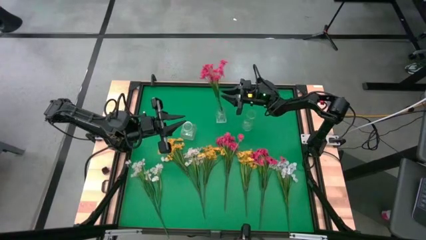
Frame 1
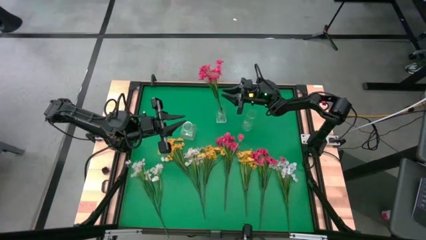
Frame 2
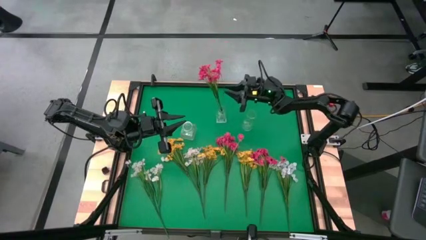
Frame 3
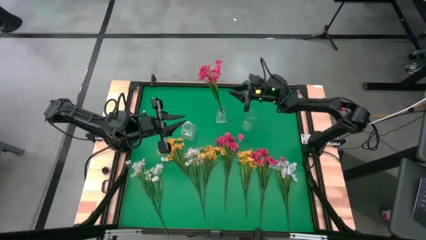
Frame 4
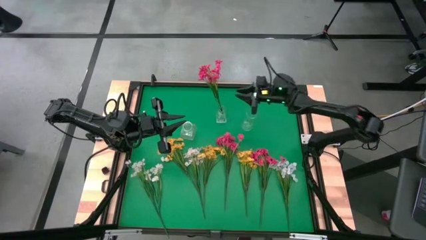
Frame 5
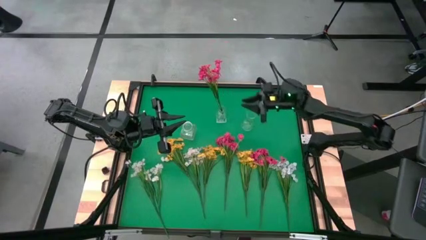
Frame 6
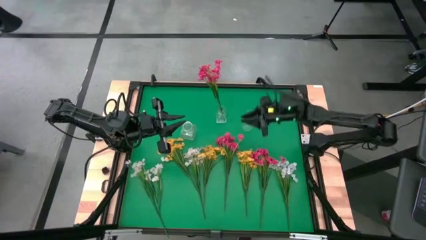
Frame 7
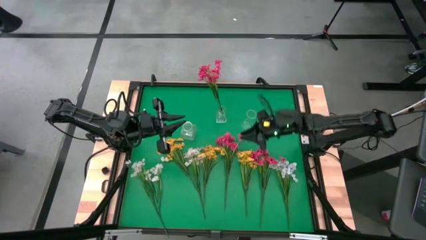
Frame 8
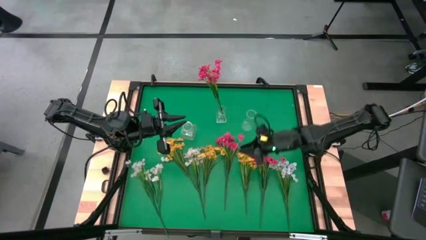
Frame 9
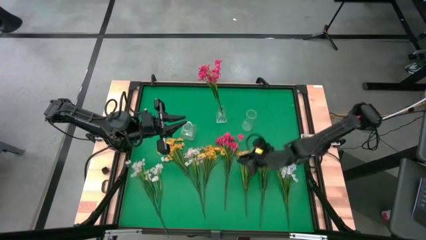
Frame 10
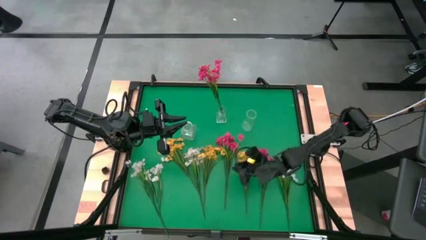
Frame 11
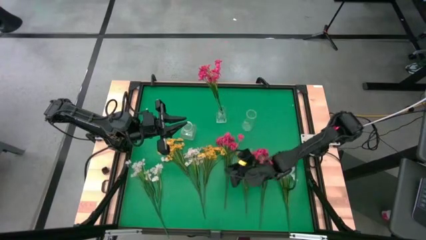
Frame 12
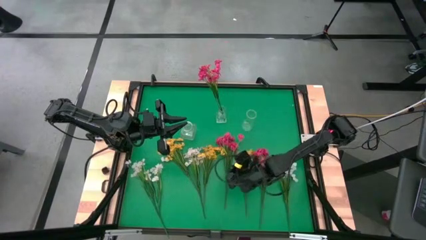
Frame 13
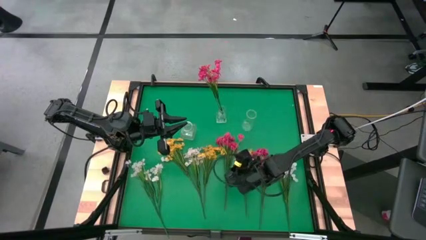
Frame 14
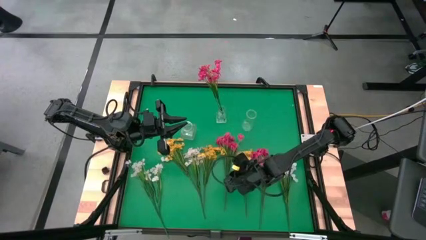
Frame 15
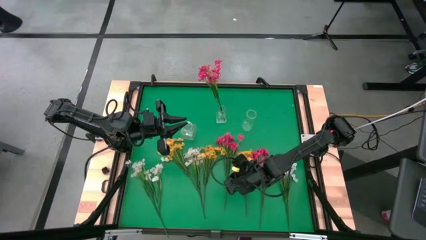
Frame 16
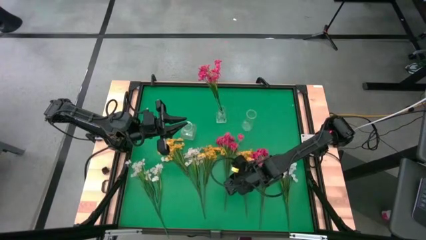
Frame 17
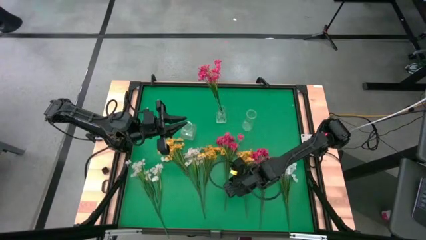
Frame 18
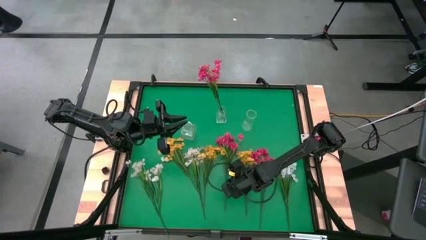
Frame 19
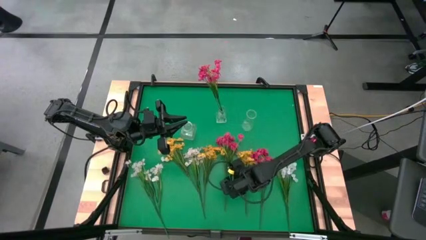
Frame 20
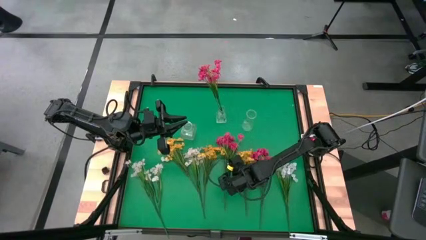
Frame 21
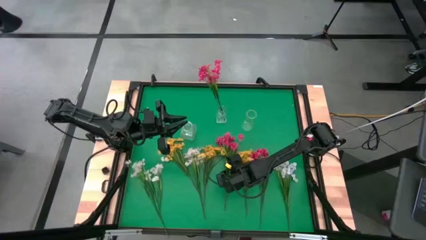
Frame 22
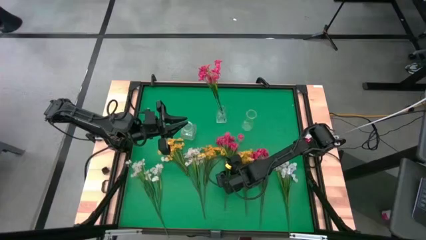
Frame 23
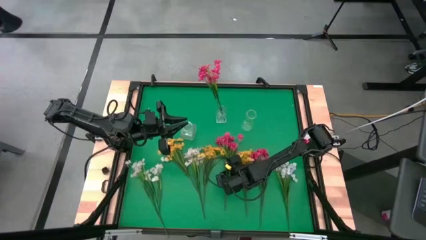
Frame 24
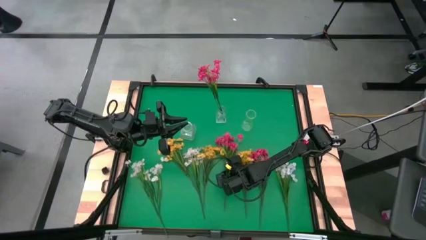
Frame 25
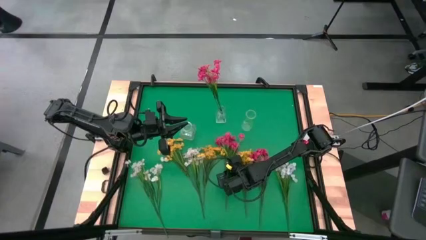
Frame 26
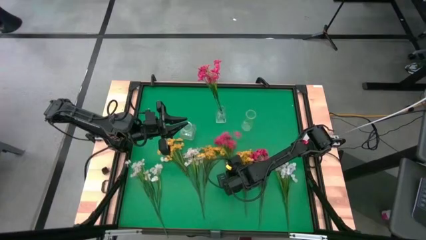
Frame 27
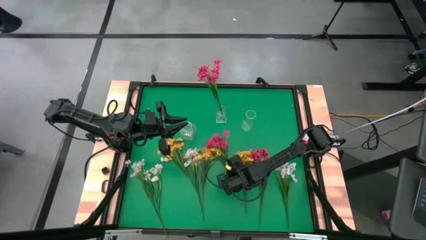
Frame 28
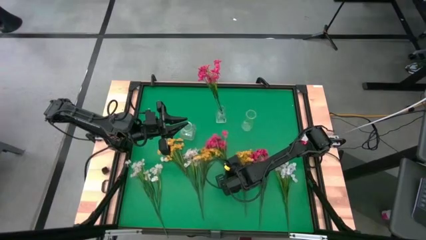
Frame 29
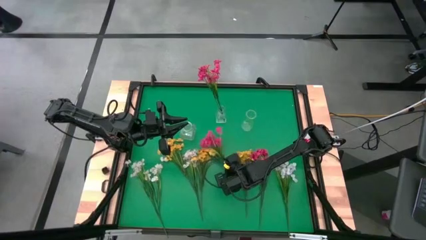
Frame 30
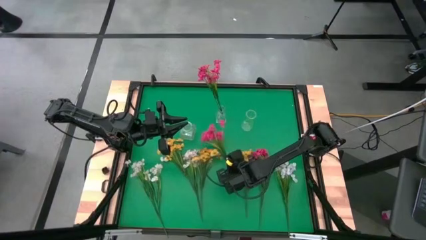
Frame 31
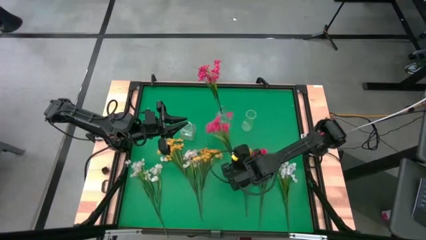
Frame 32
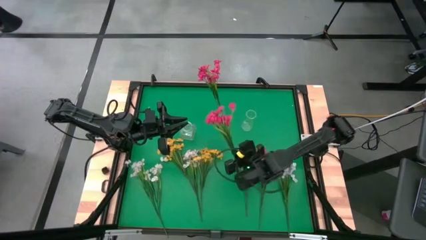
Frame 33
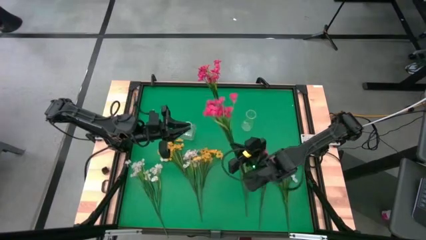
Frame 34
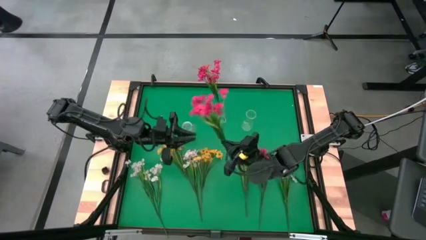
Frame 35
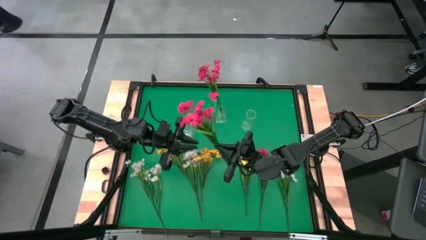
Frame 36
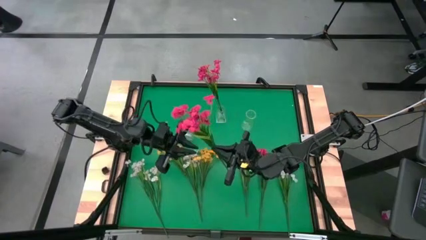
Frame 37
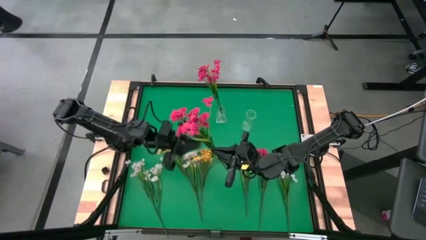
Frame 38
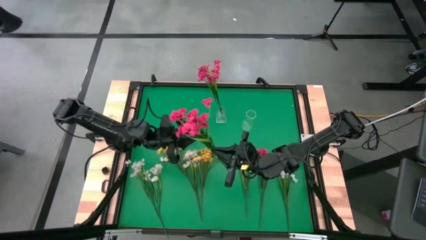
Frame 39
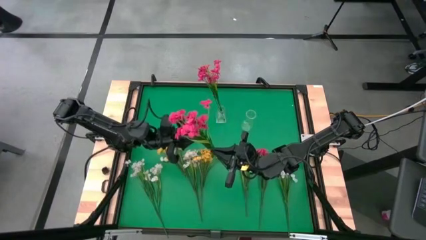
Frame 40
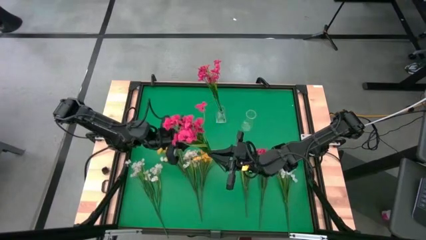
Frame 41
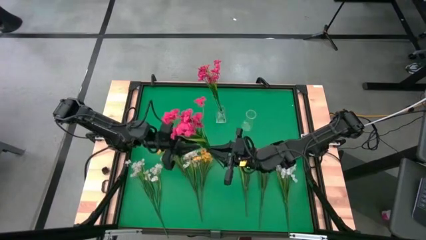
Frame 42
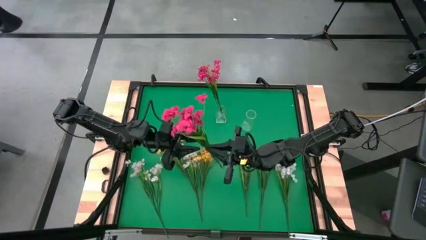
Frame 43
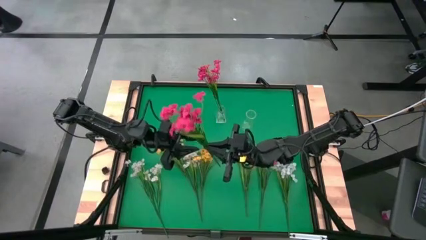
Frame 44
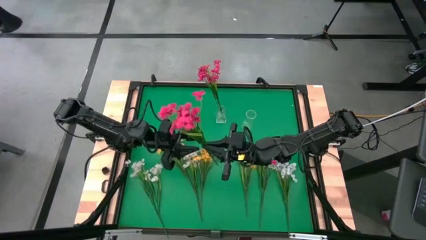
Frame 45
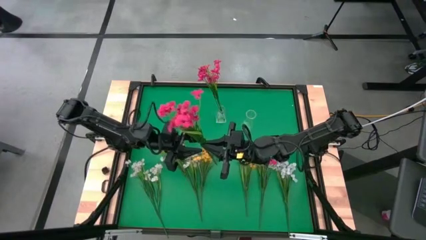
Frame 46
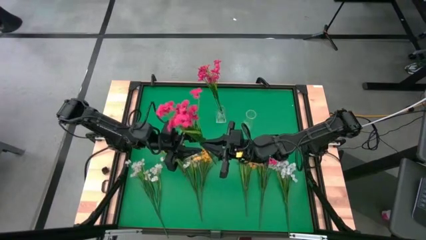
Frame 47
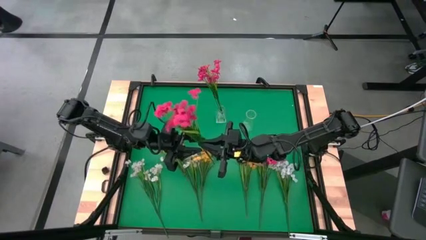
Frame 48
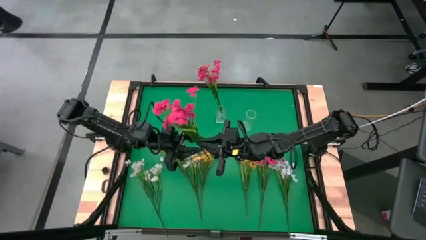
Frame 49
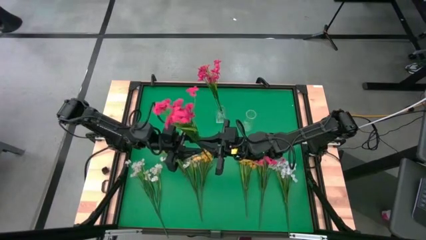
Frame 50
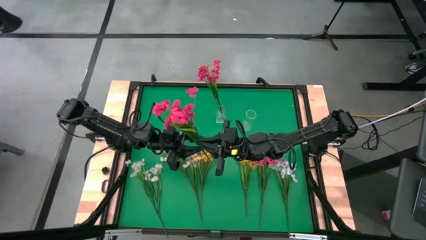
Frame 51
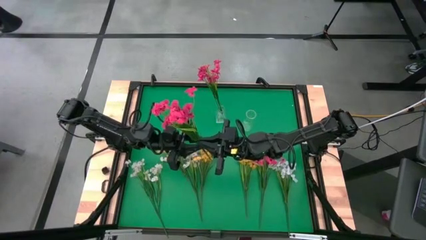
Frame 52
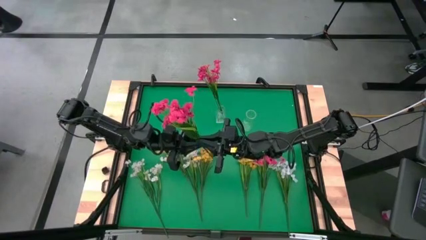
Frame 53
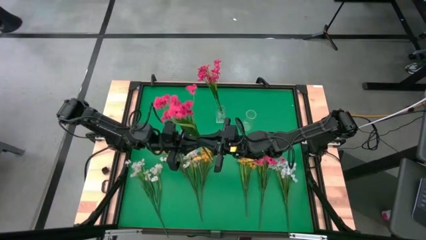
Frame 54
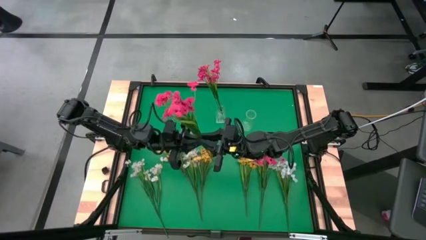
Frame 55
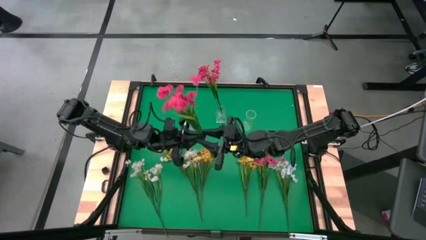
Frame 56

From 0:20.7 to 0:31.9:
Task: Sort flowers into vase by color
Put the left red flower into the center transparent vase
